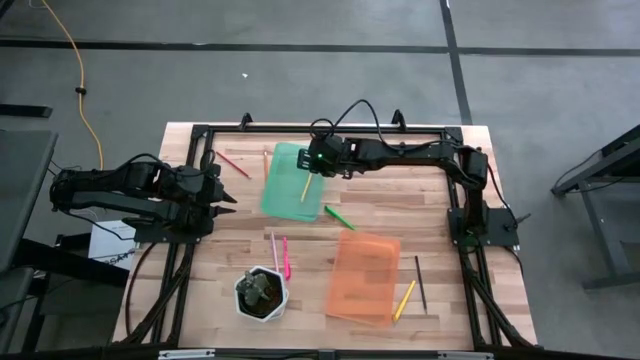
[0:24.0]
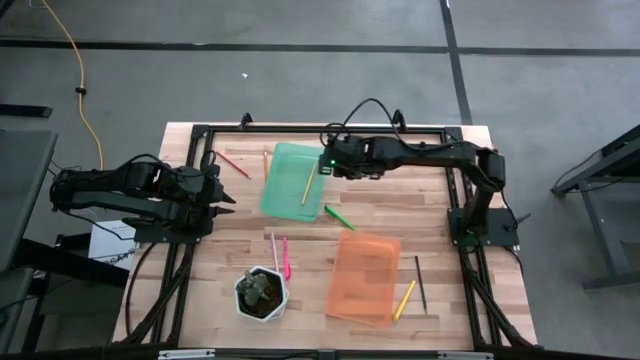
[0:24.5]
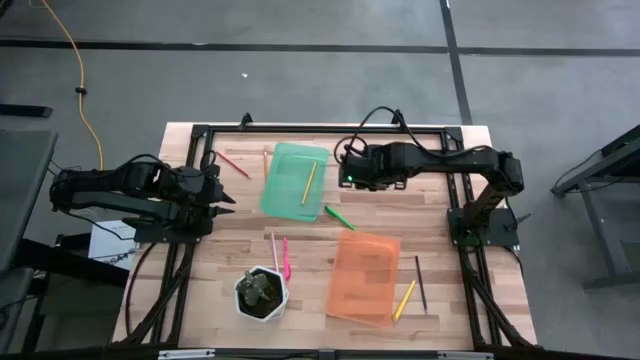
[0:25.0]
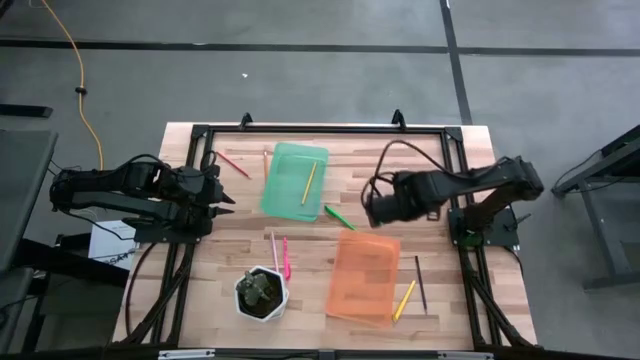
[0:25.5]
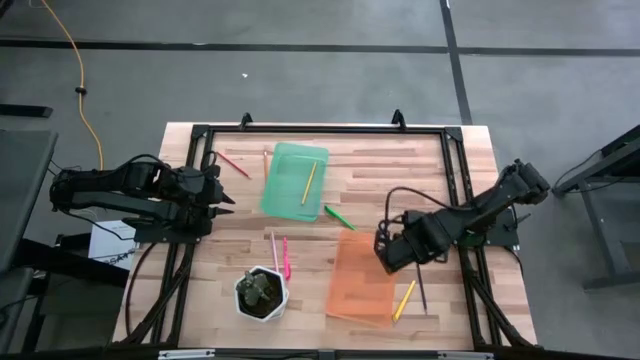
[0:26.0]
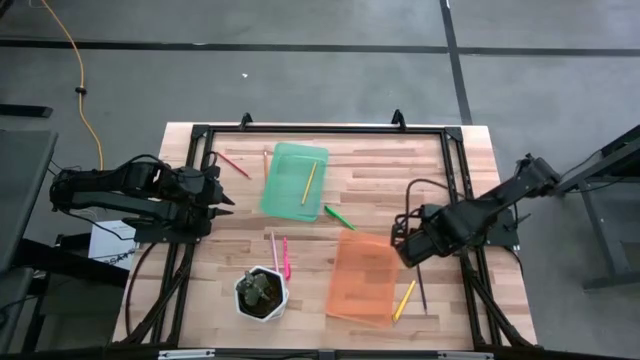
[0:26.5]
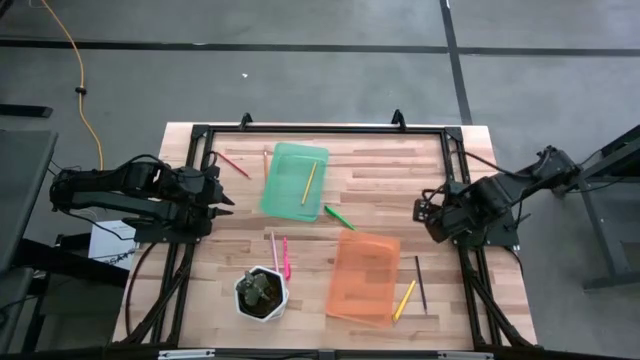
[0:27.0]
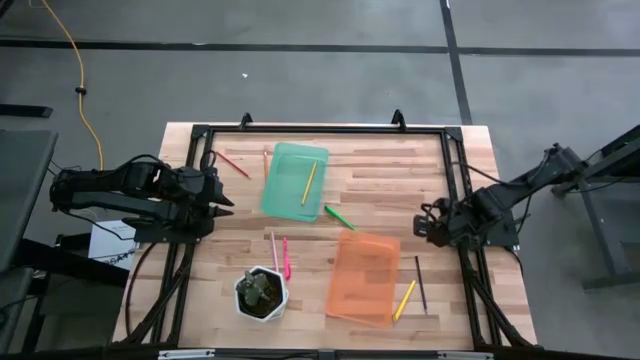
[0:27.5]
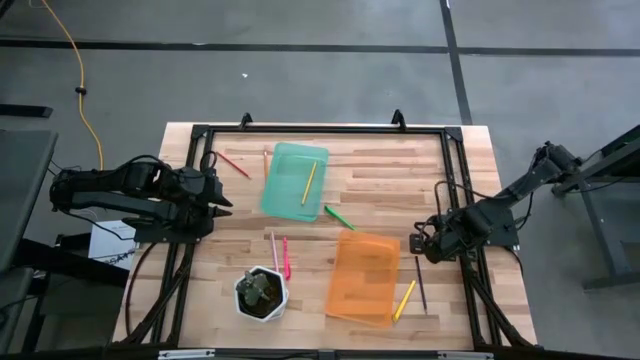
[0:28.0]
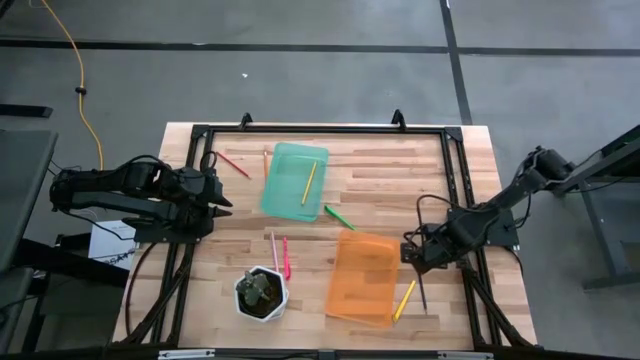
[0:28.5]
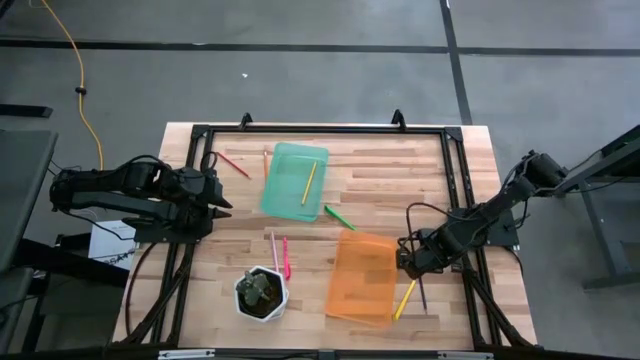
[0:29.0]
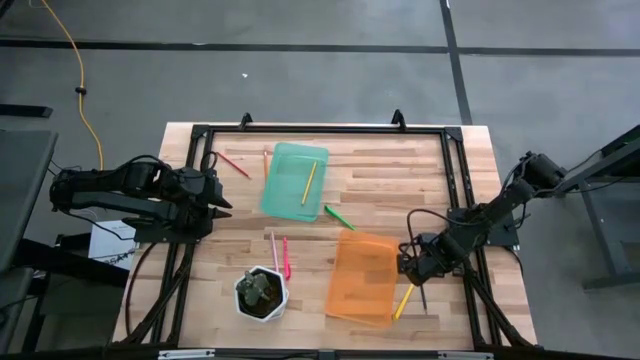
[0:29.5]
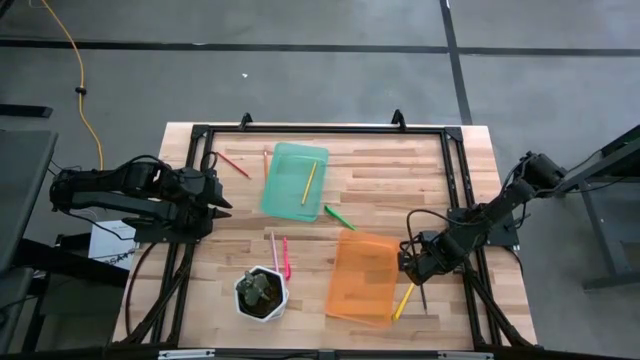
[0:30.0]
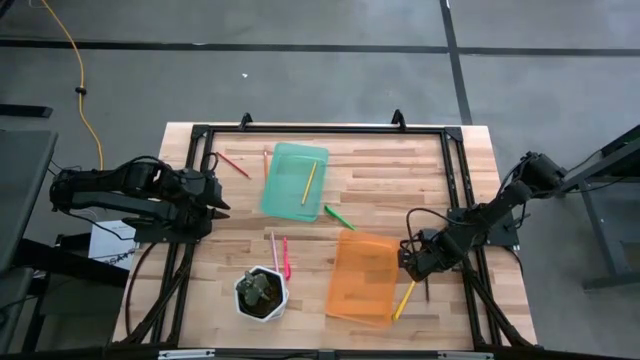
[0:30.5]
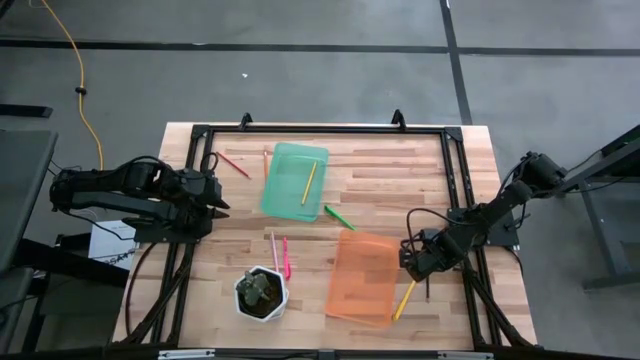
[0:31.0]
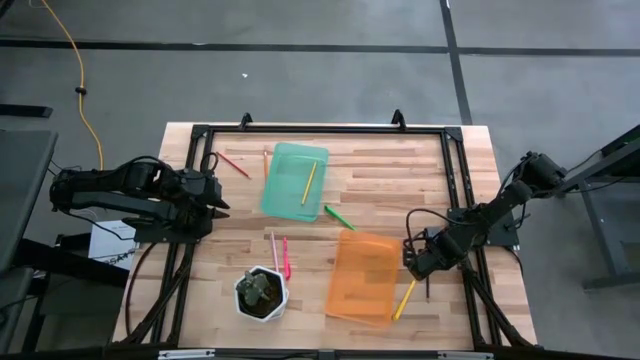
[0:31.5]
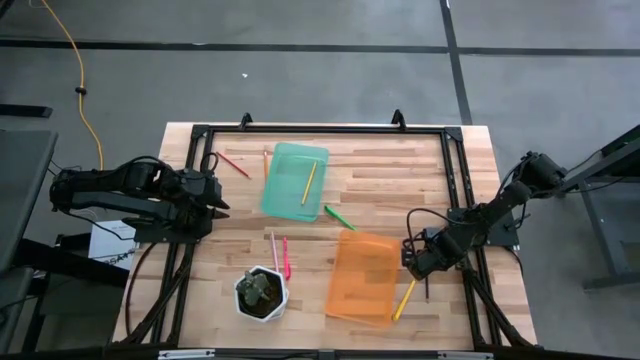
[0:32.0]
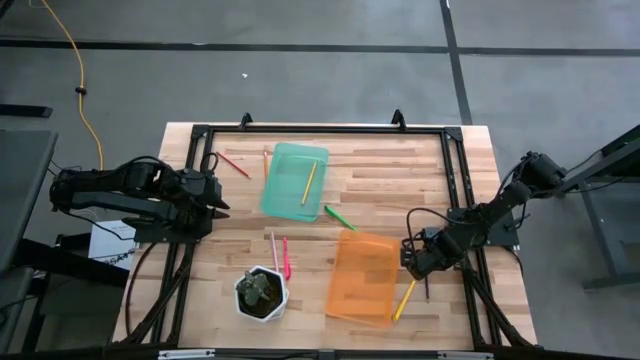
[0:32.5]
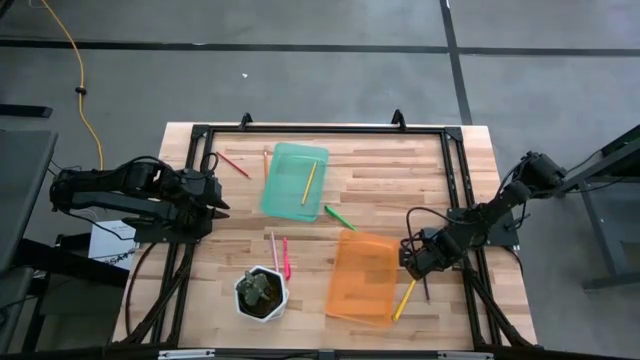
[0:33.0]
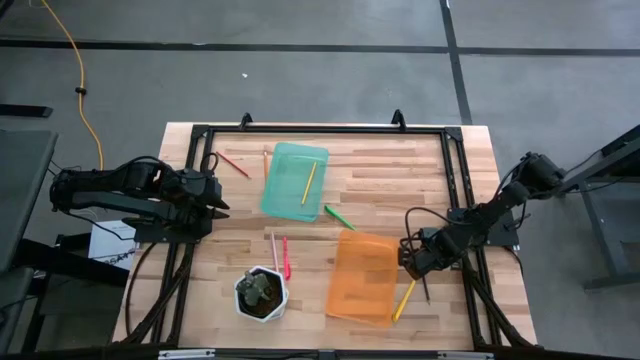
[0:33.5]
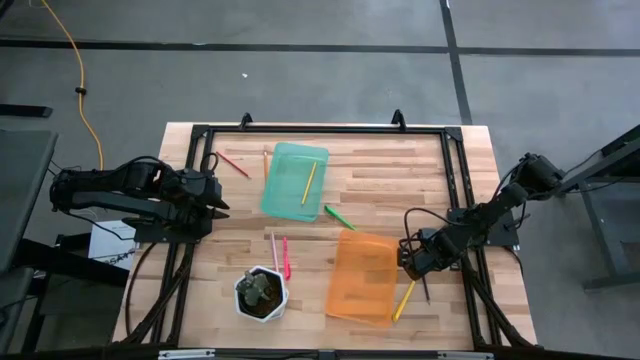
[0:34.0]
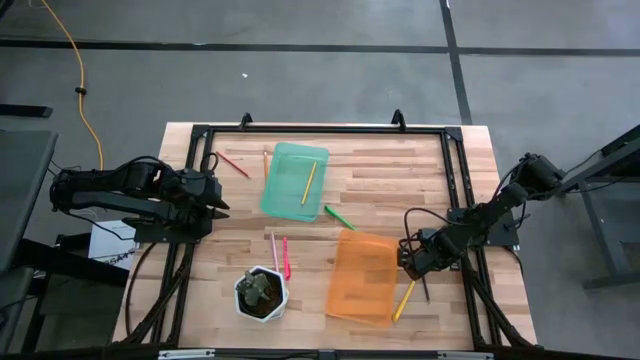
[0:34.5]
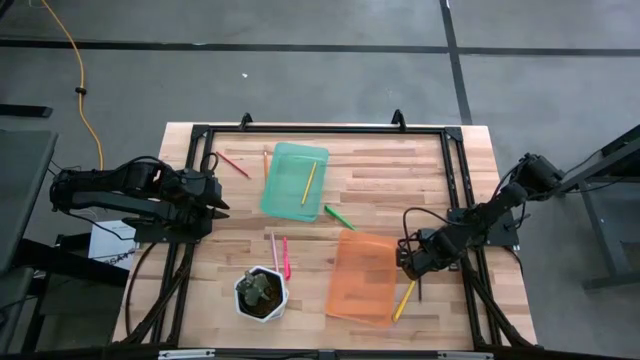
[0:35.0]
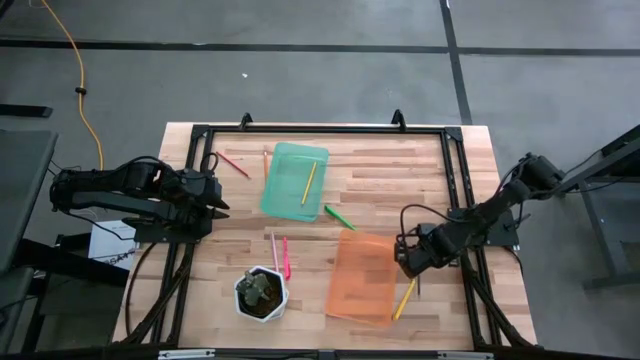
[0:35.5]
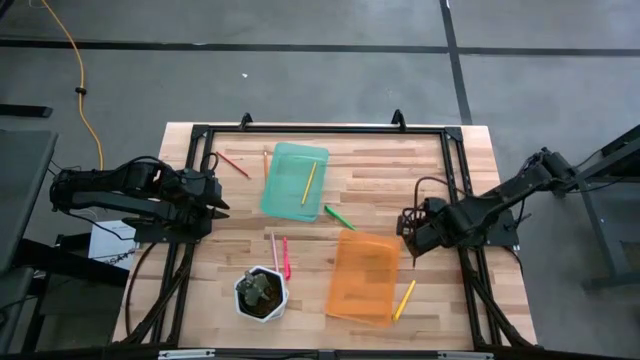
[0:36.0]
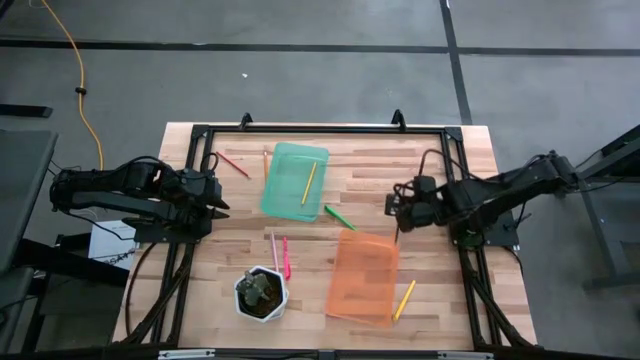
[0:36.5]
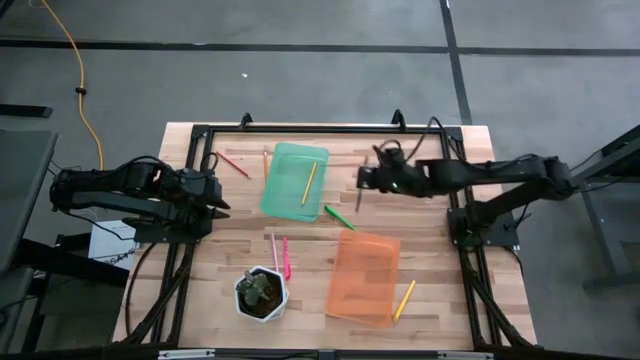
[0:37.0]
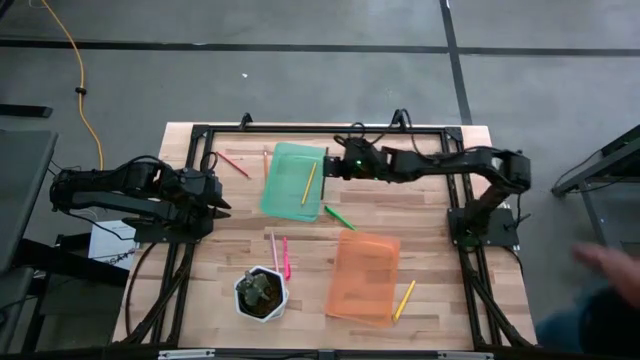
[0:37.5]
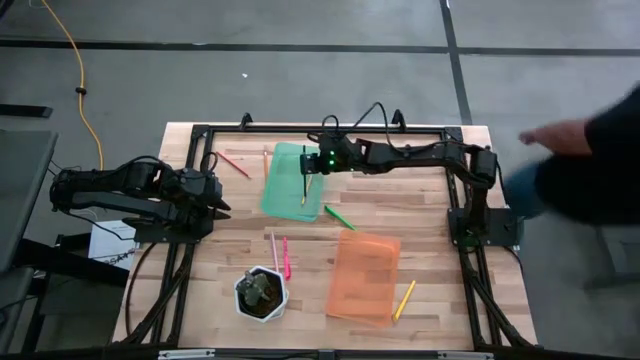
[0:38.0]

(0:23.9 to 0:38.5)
Task: Sort pens & pencils
Put the blue pencil into the green bin
